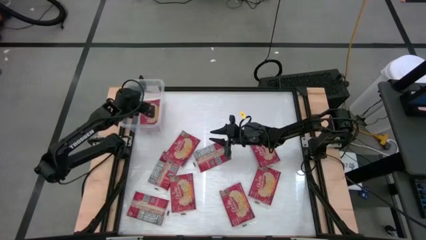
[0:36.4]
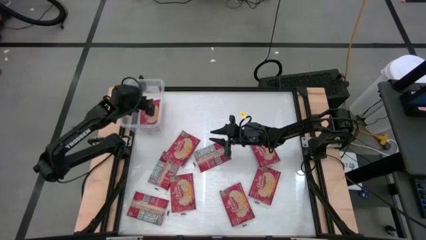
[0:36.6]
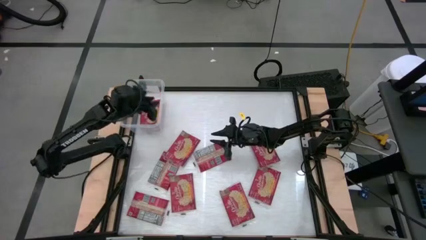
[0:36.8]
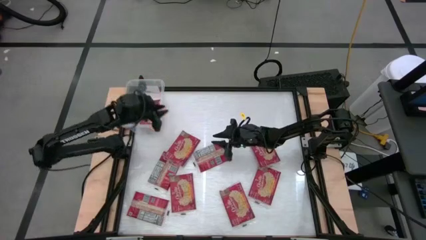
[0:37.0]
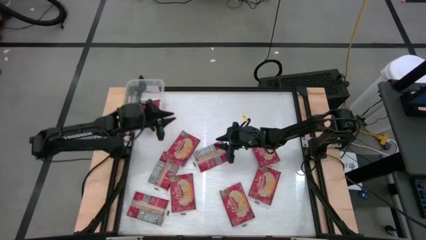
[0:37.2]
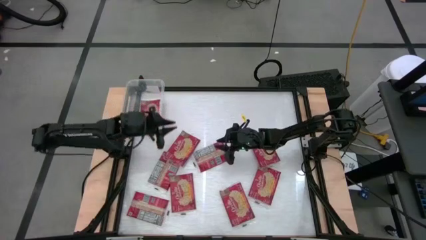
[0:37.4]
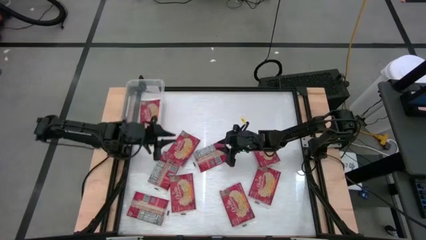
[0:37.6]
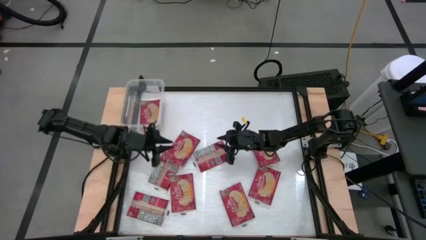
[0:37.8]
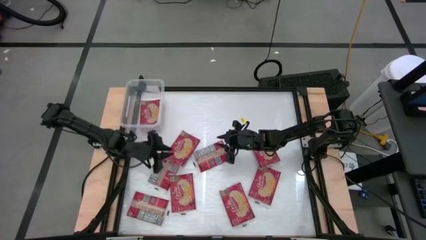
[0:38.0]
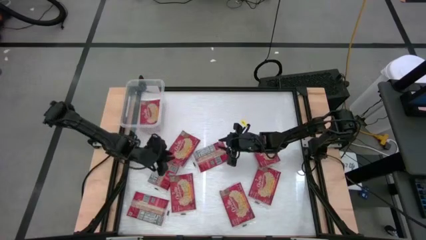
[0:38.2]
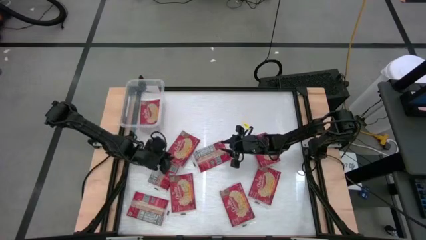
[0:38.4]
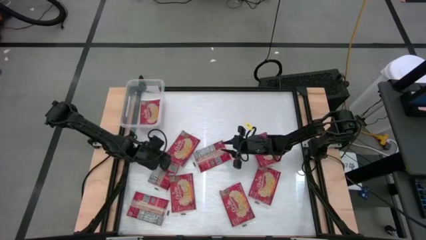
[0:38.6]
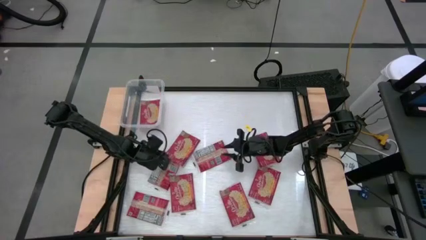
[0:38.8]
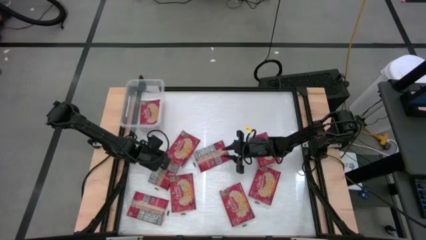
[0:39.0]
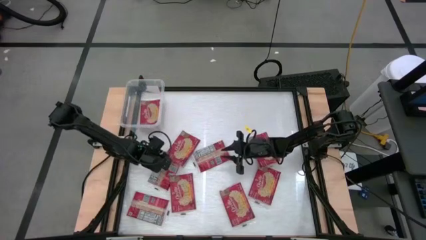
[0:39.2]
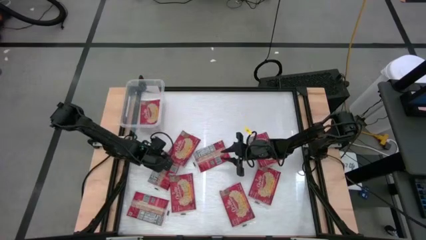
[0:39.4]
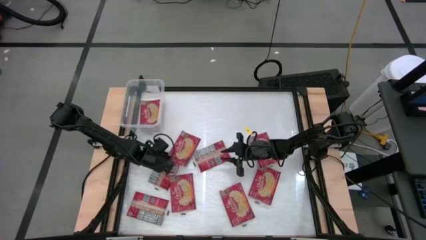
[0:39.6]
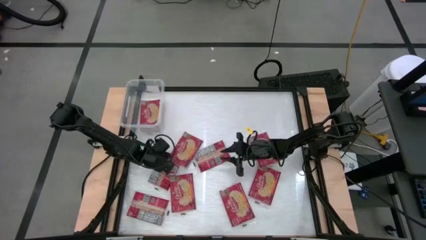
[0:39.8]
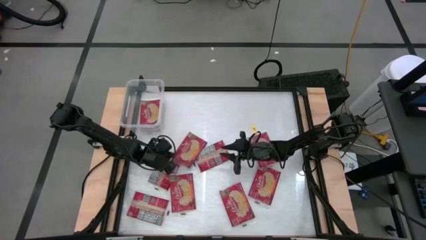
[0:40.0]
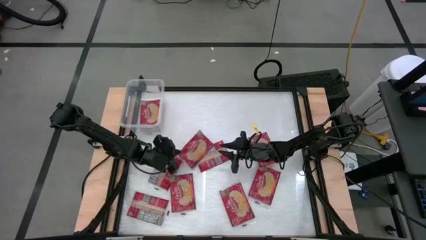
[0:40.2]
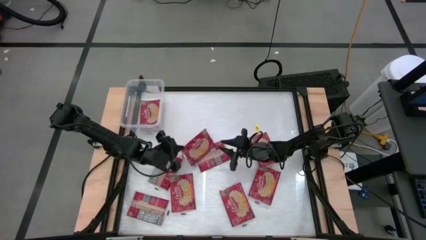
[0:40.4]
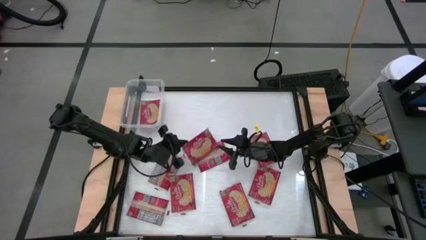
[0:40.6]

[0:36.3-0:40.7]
Task: Sort popcorn bags into baskets
Stack the red popcorn pack into the bin

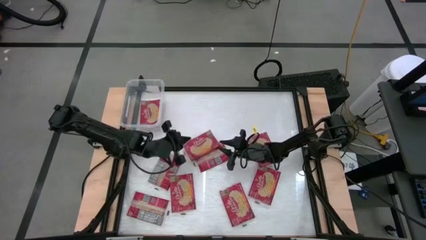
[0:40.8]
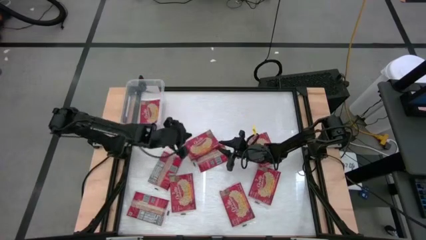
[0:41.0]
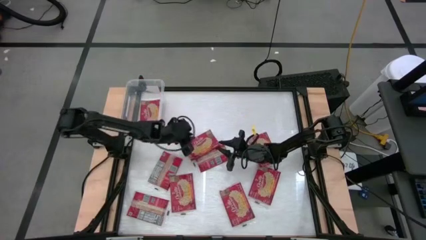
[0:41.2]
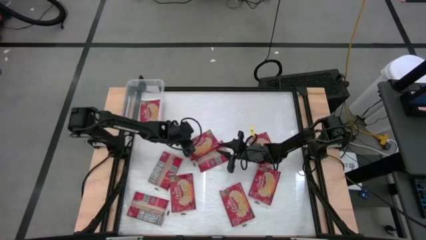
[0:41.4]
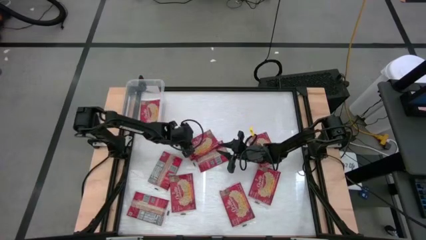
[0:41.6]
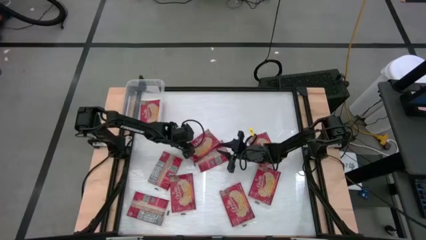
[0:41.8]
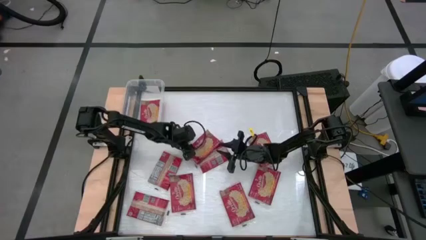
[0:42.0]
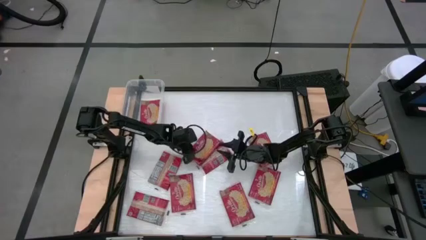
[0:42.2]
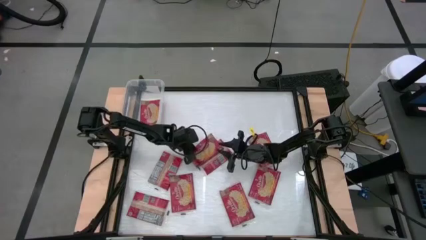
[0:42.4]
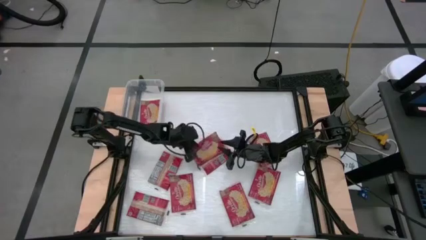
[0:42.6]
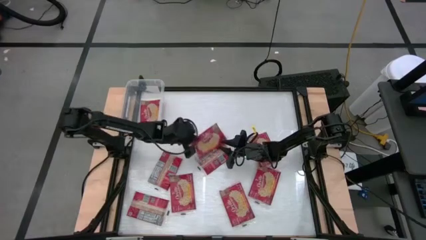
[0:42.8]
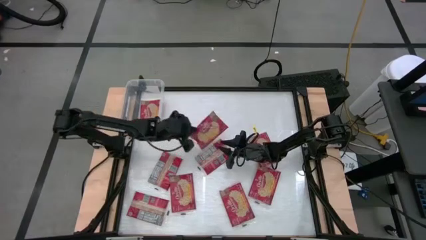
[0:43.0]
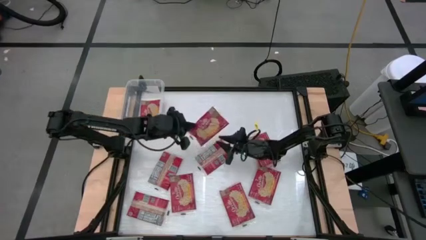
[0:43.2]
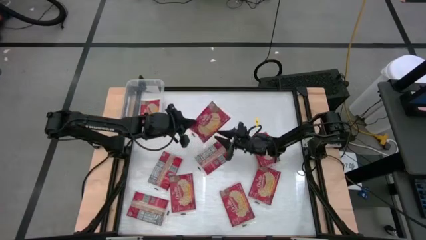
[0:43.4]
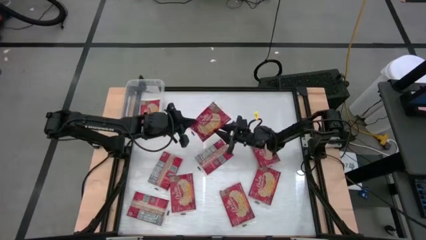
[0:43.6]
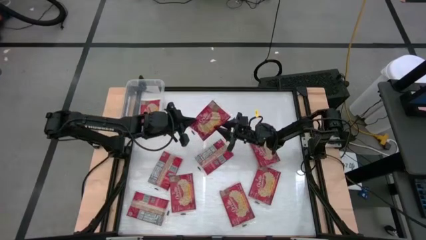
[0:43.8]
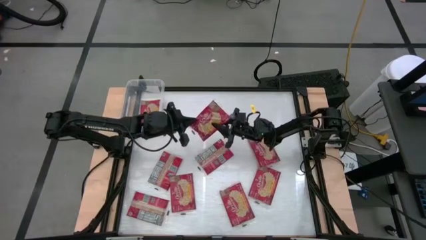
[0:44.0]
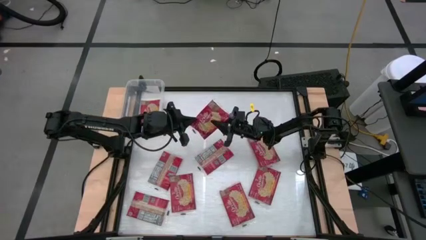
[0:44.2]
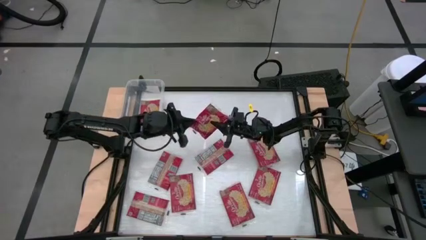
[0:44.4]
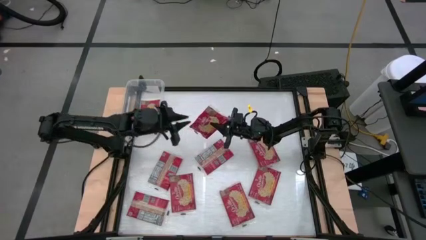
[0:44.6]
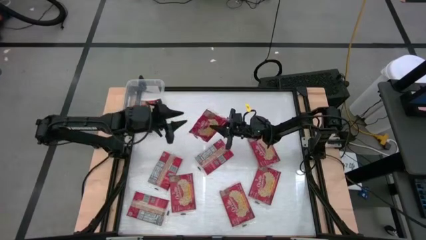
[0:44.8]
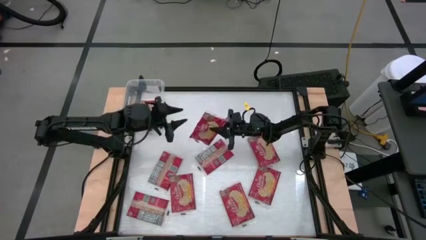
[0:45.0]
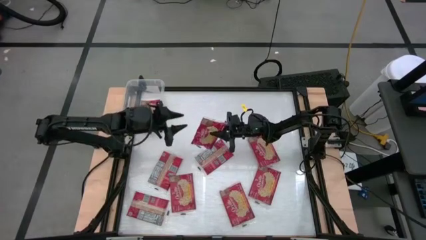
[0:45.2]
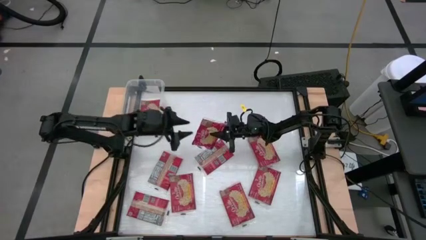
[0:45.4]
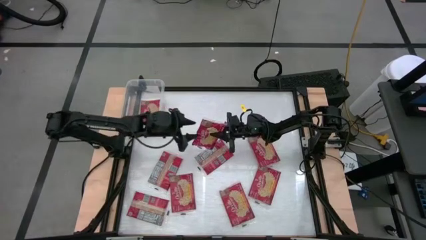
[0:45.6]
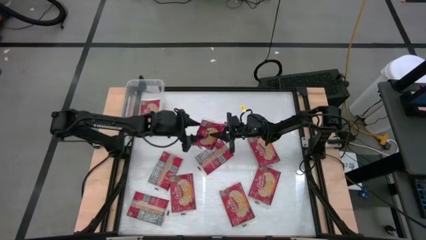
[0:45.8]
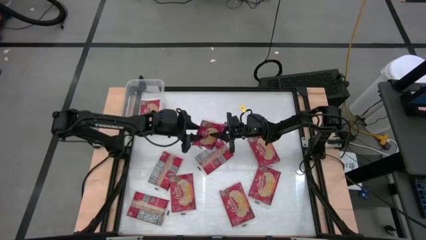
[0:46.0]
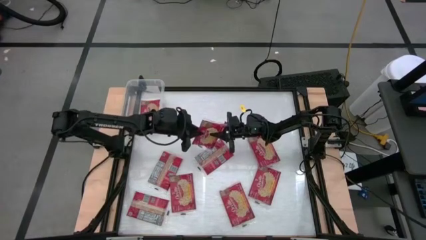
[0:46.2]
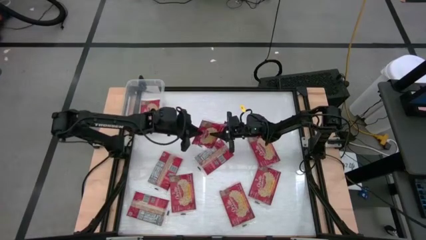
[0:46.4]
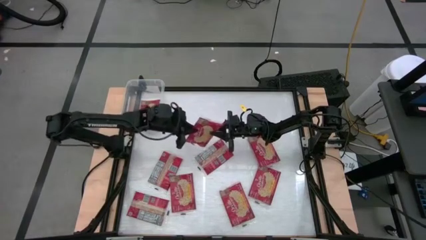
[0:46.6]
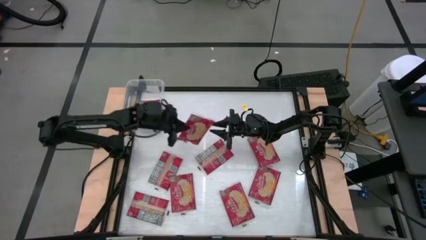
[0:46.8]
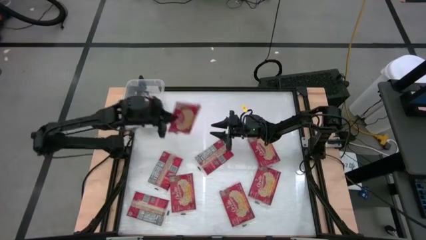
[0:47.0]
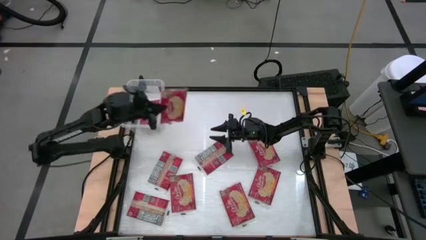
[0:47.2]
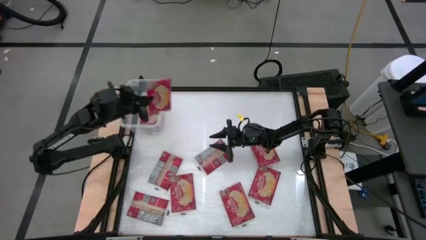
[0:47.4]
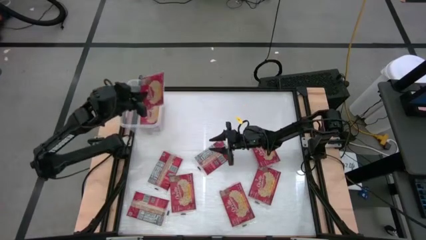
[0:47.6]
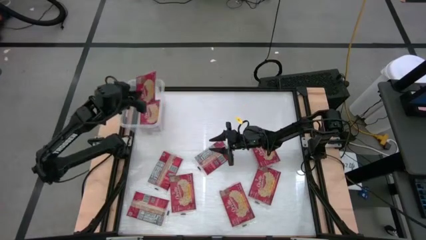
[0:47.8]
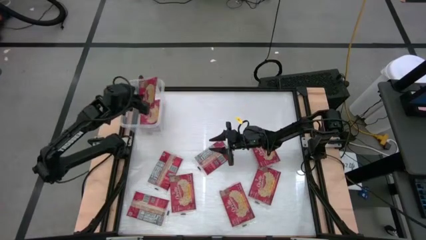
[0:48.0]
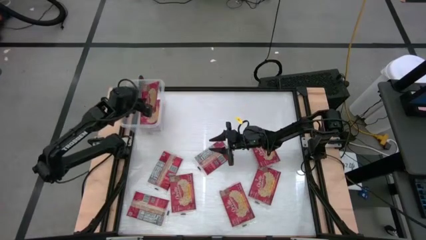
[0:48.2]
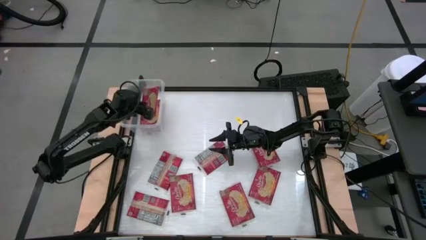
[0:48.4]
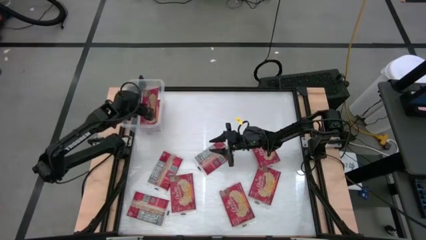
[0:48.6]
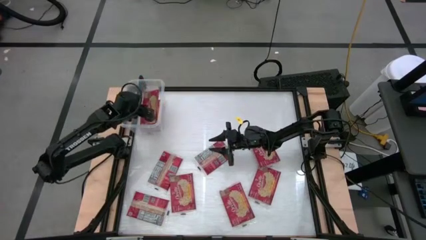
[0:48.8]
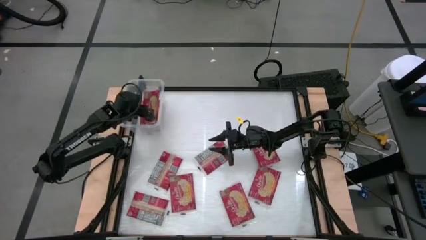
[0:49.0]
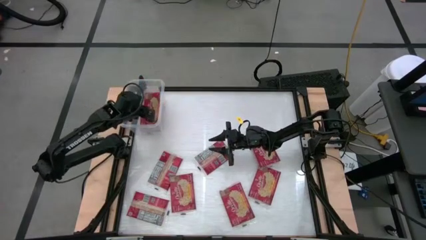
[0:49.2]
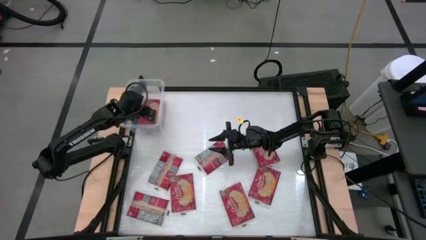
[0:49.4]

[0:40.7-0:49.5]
Stack the red popcorn pack into the bin

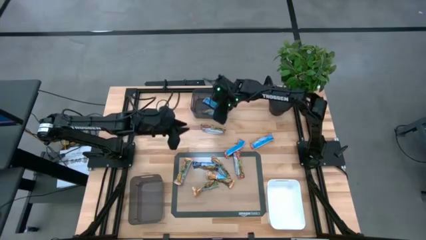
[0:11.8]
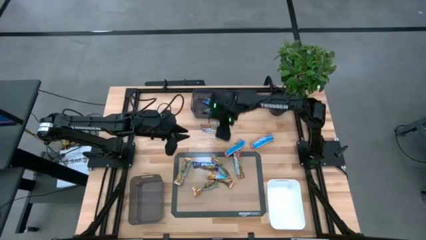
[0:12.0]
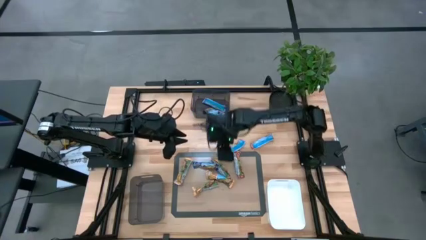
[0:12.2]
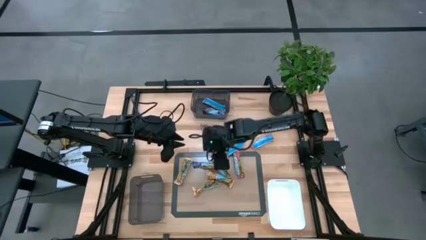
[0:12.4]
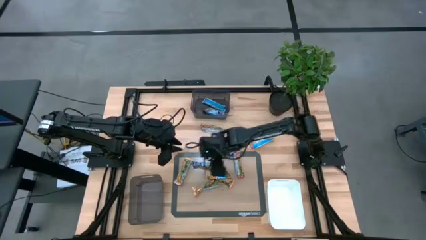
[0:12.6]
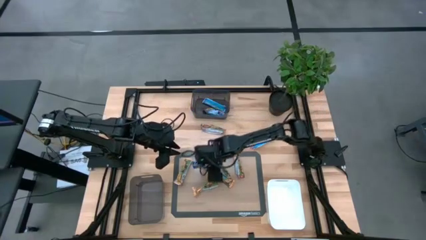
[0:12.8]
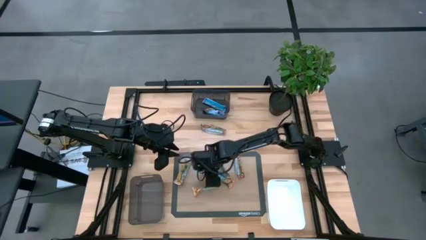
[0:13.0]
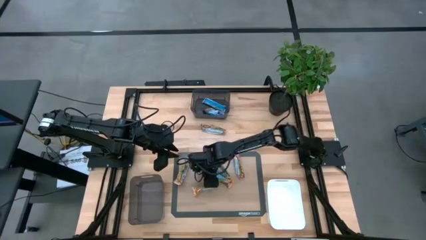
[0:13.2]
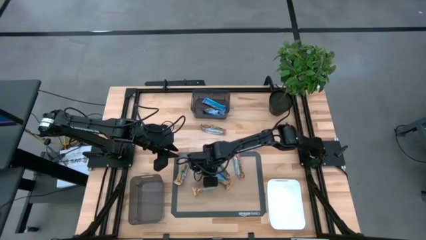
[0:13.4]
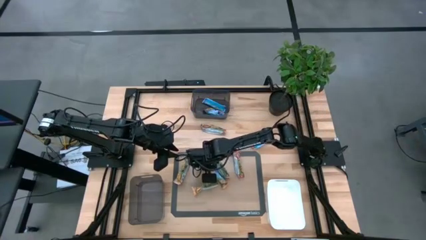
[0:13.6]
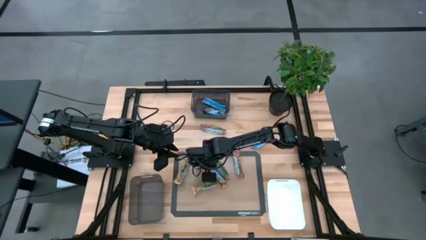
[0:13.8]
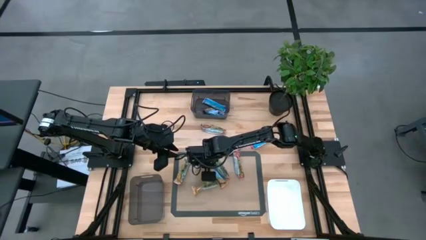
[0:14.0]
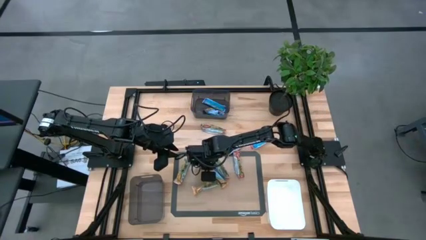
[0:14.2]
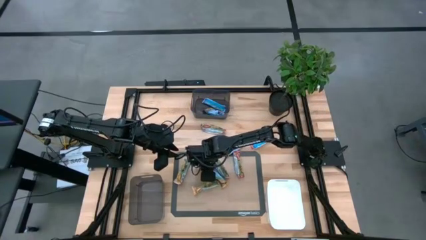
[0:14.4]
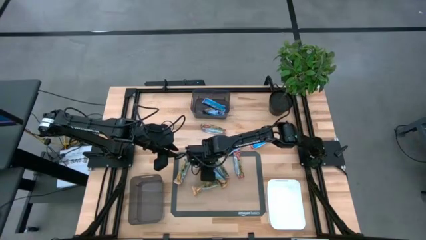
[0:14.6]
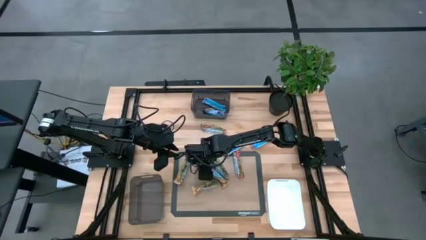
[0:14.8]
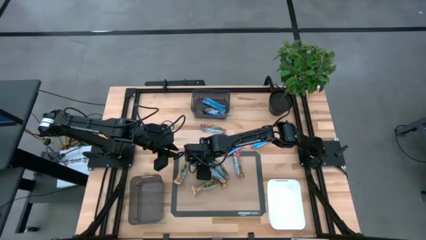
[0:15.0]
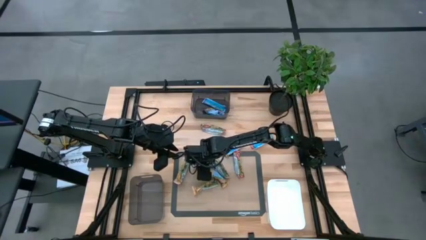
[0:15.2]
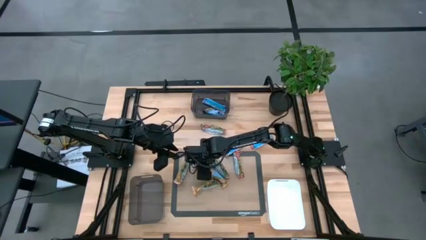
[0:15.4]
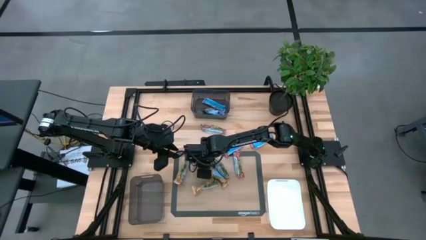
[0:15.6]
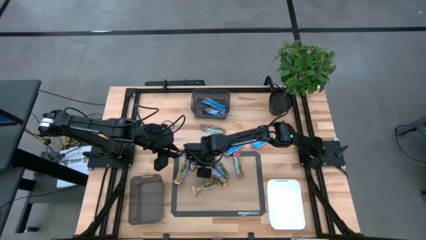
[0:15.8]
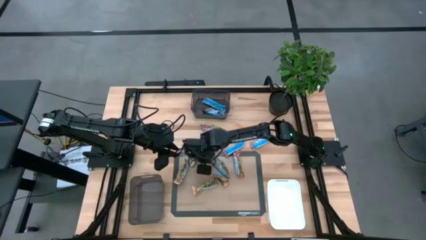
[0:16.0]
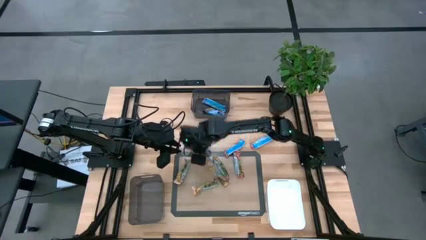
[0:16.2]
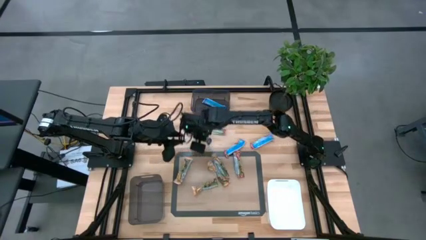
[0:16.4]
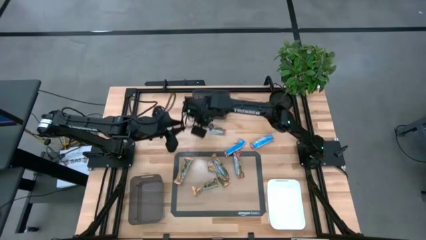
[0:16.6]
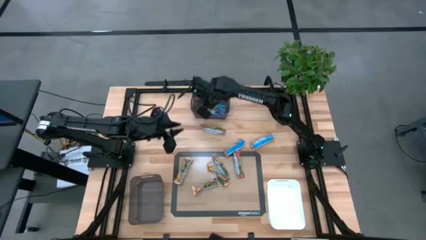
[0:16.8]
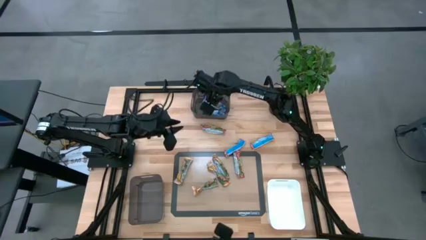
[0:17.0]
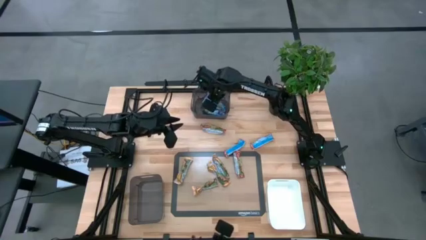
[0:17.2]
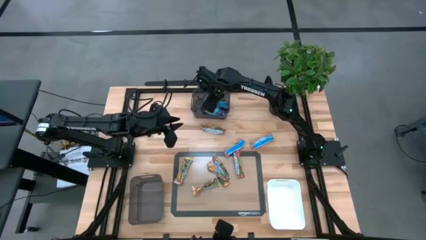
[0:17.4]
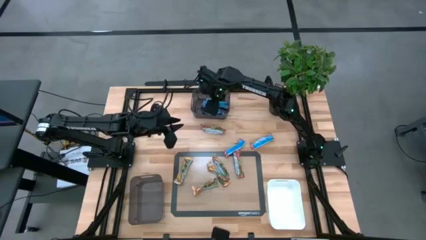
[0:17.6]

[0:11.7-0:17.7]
Task: Pick and place Granola Bars by type
Put the blue snack bar into the top black transparent bin
